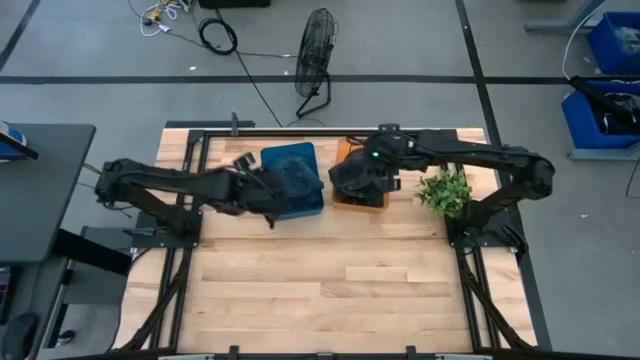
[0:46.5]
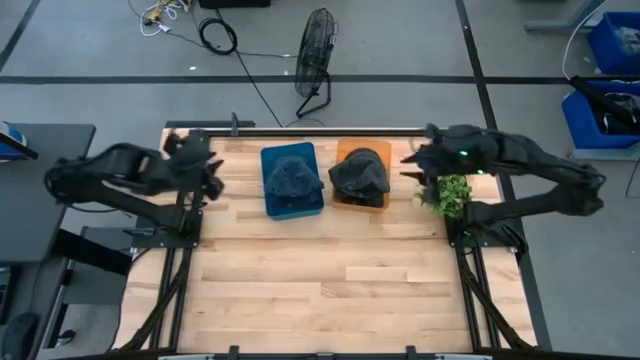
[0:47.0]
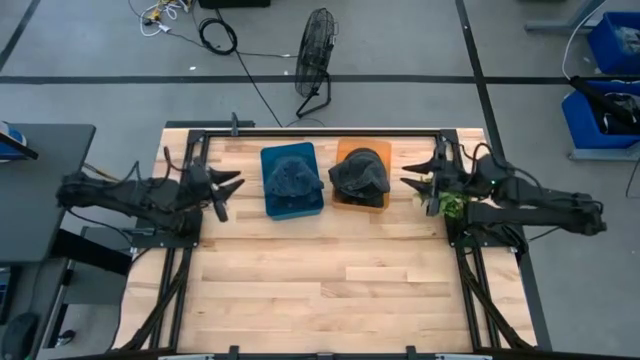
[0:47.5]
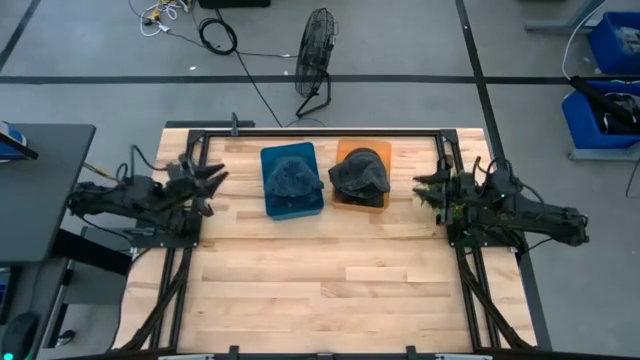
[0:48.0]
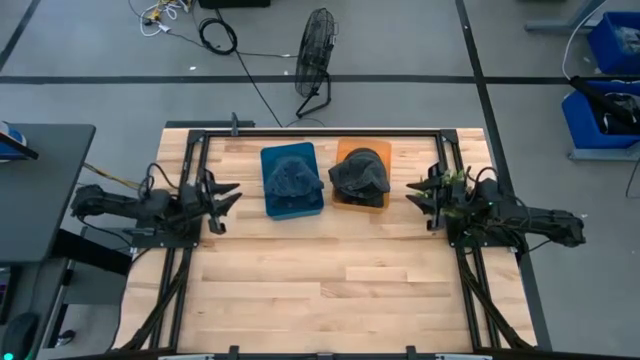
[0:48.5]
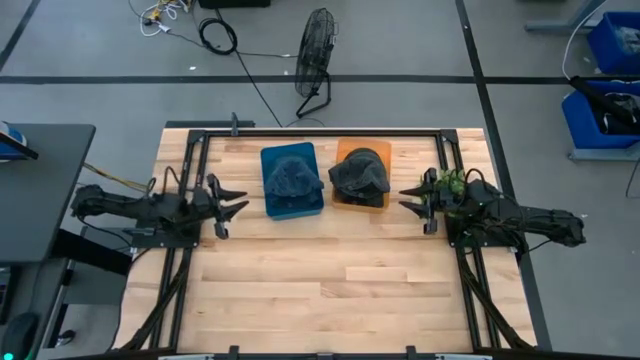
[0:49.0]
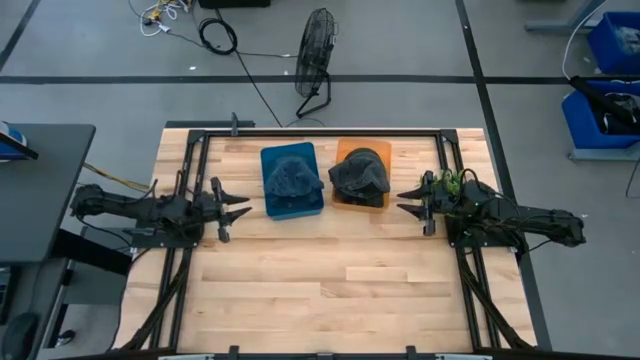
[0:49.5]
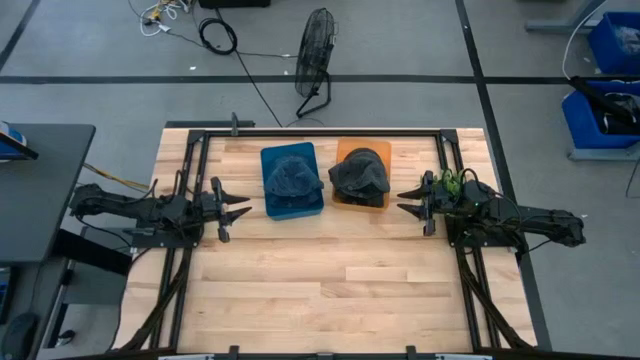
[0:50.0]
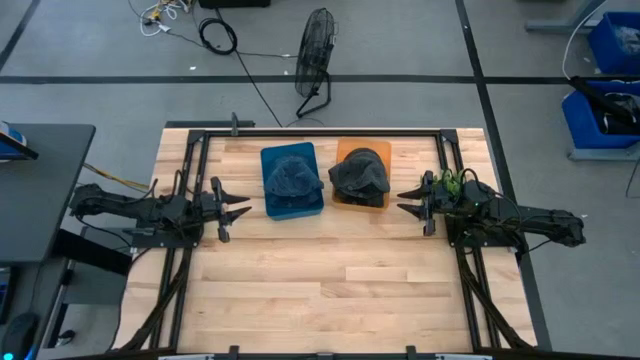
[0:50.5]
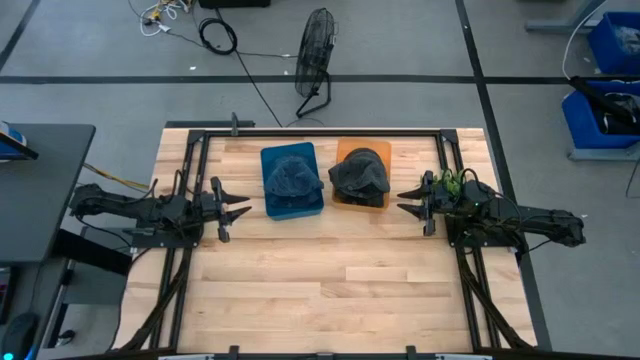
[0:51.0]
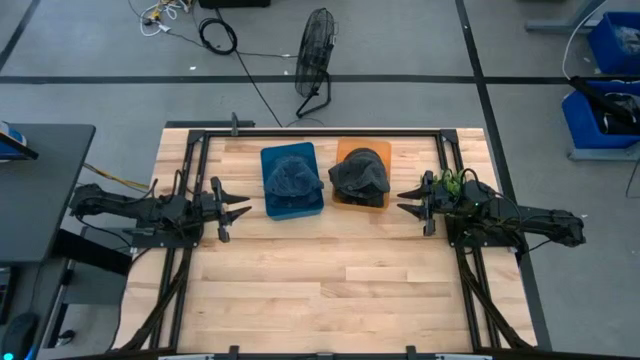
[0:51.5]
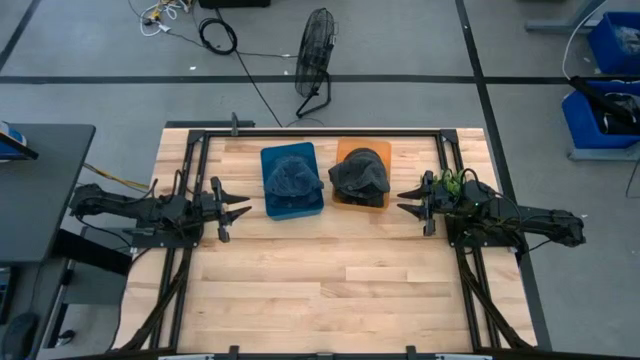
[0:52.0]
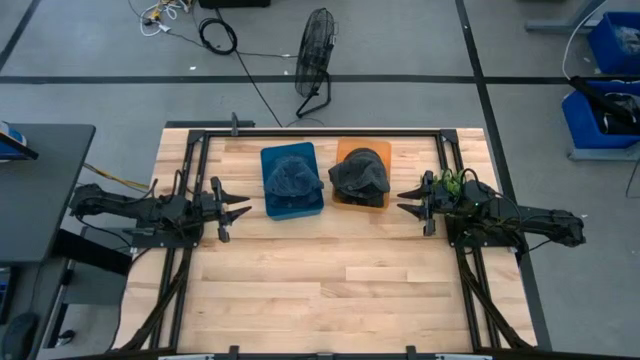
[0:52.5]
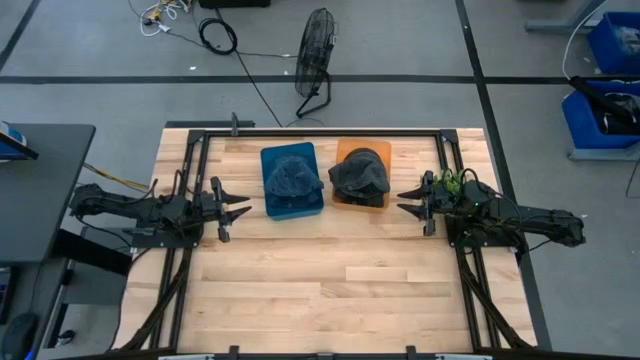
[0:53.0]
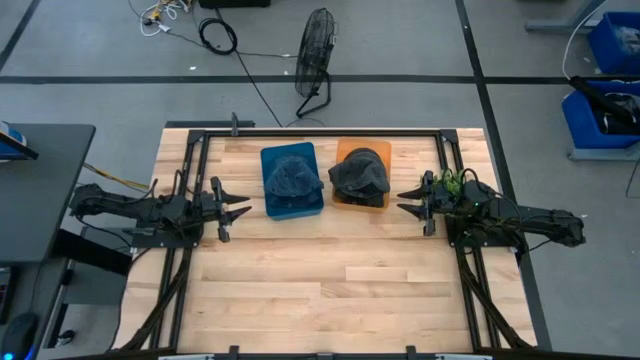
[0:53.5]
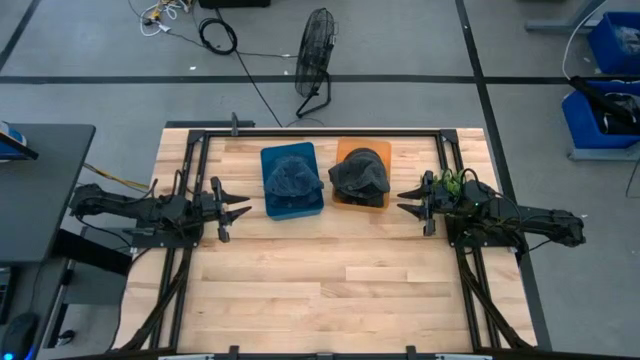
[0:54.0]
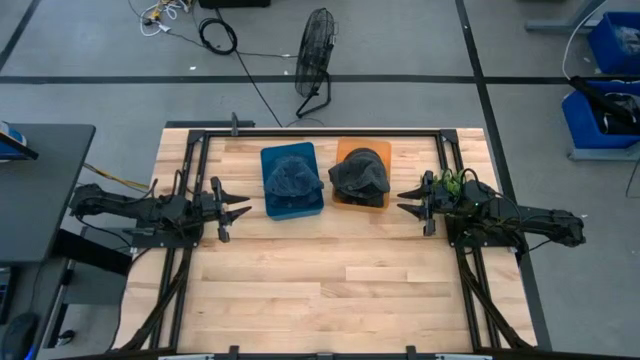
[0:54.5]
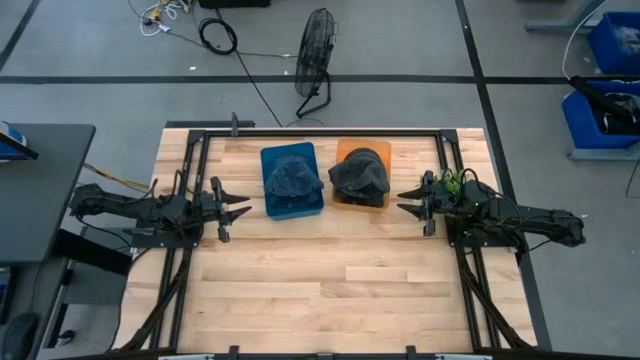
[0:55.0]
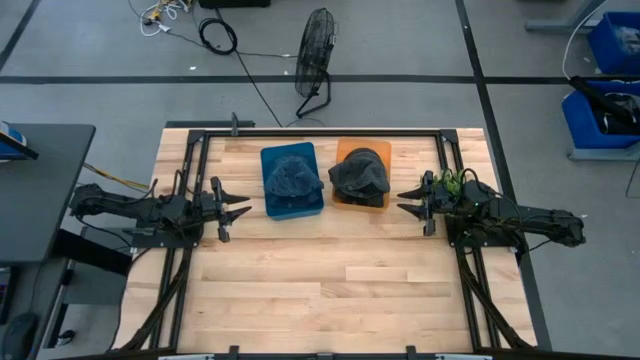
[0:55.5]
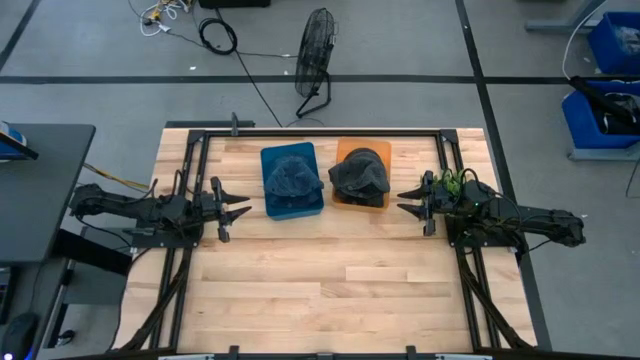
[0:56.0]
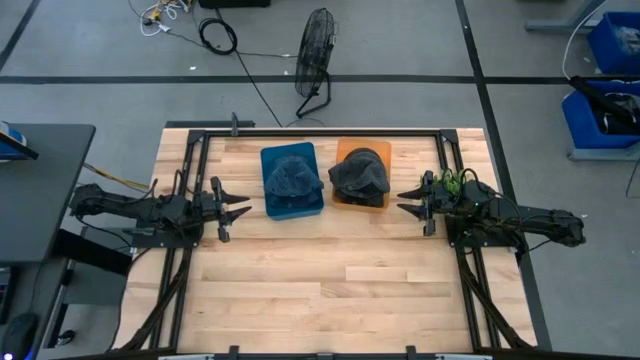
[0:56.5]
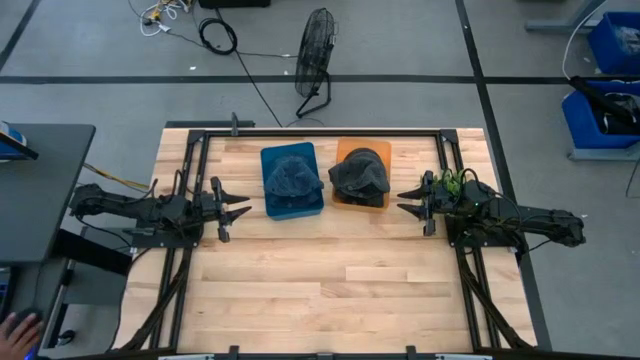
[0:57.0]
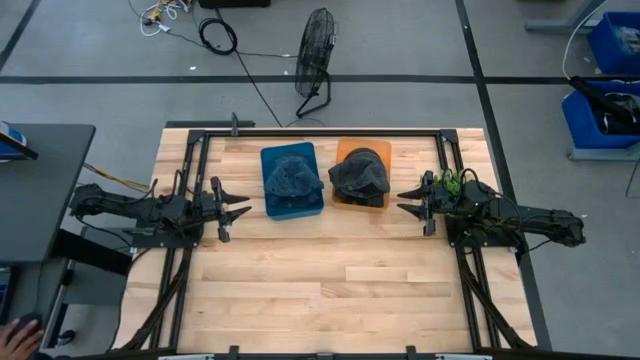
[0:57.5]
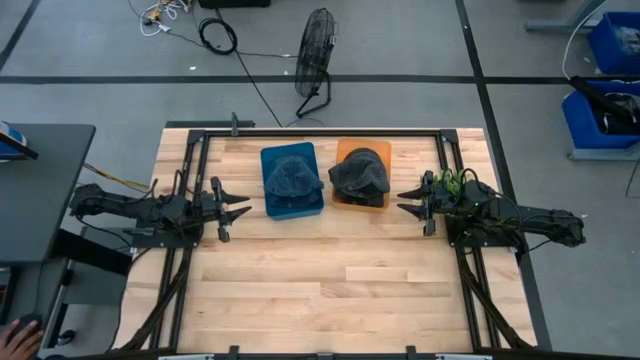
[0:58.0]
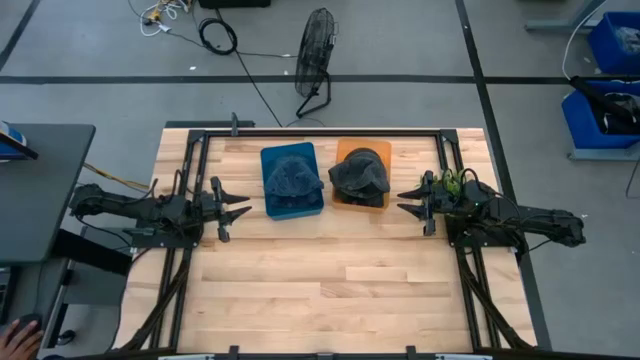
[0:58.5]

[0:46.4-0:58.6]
Task: Pick & Place hat
Return to Home Position

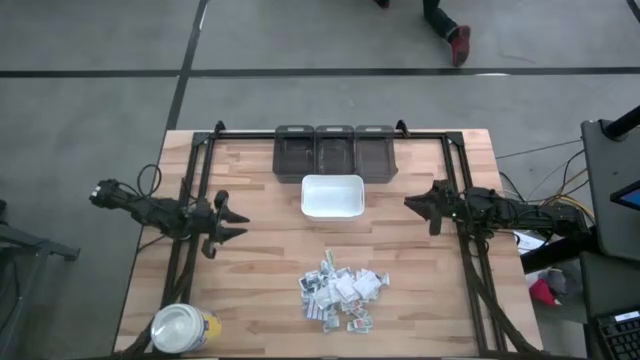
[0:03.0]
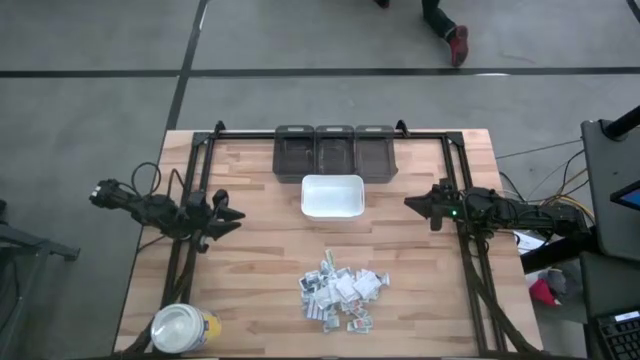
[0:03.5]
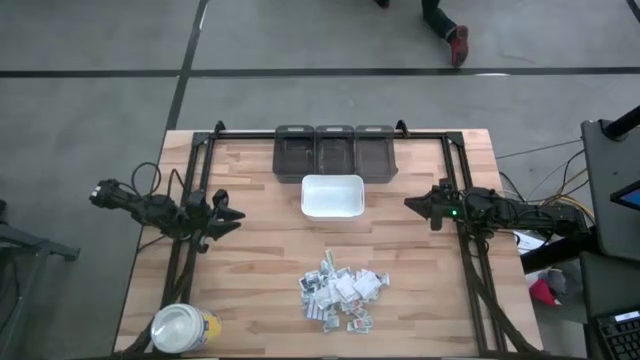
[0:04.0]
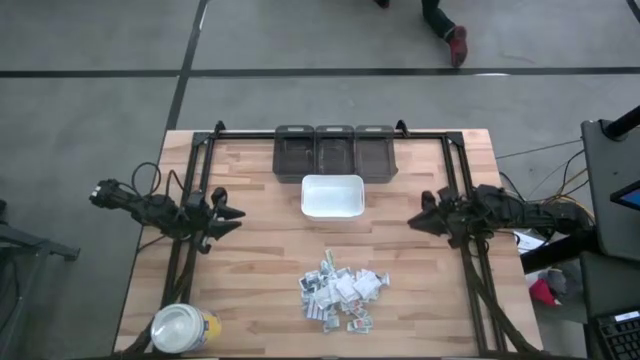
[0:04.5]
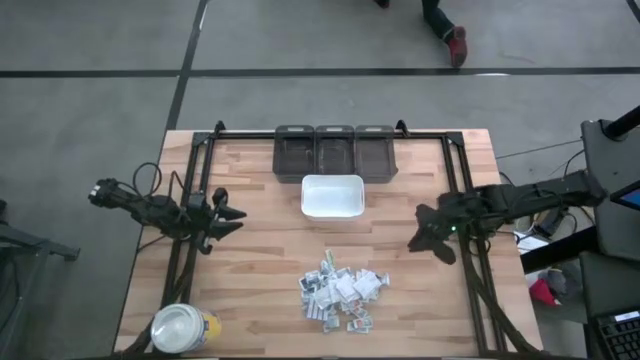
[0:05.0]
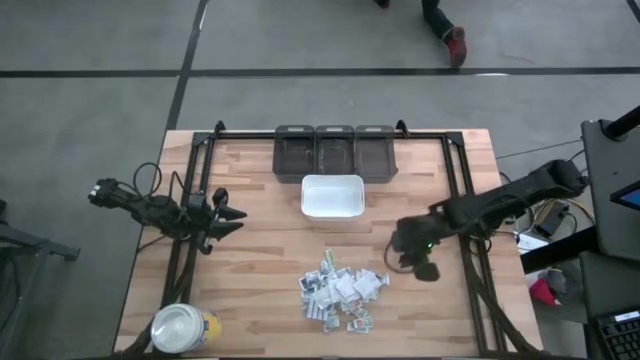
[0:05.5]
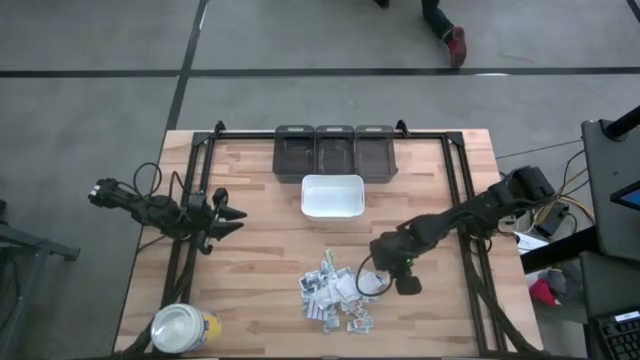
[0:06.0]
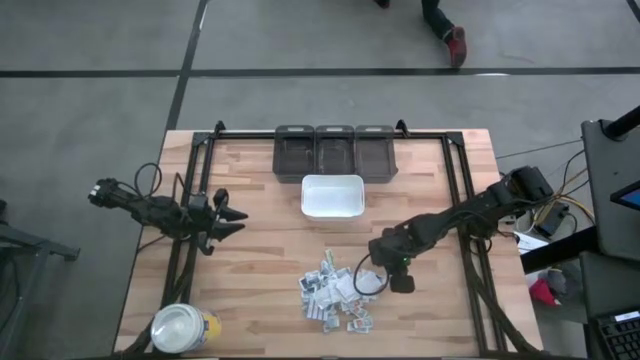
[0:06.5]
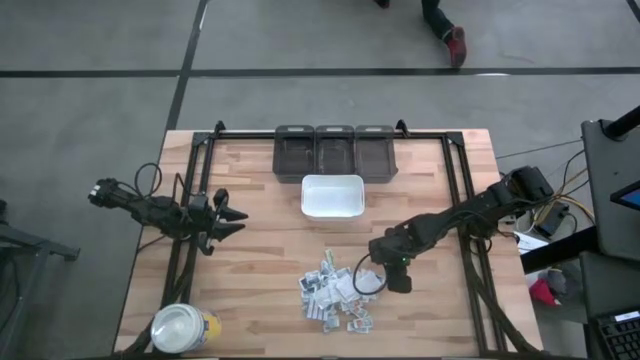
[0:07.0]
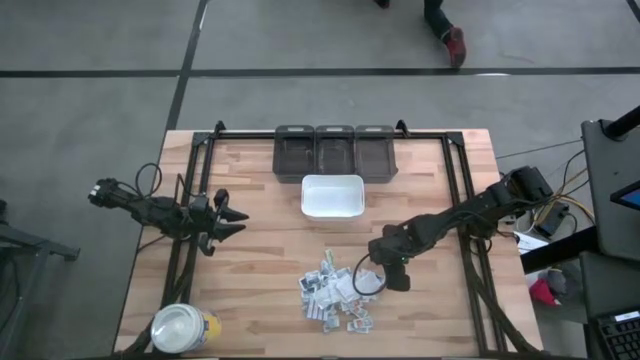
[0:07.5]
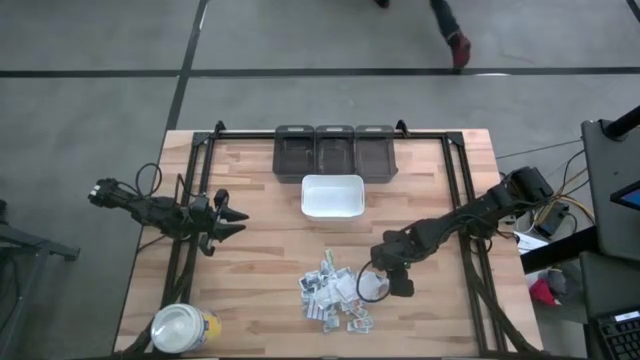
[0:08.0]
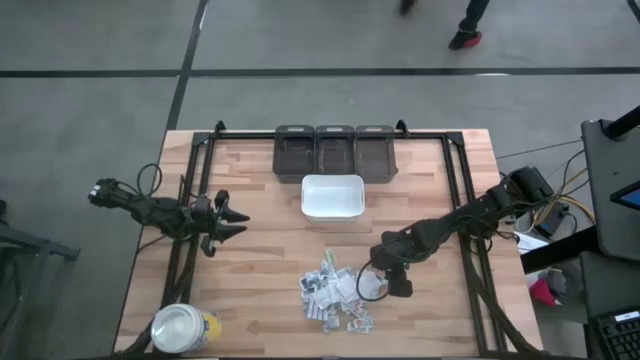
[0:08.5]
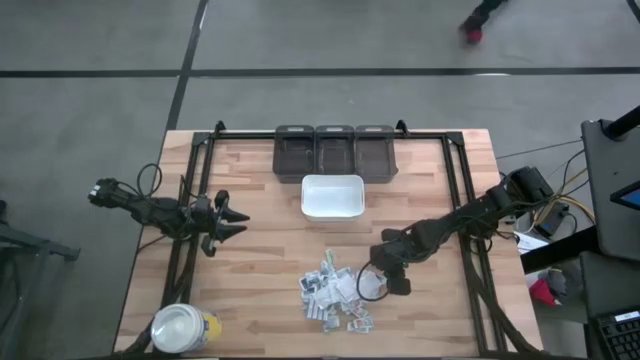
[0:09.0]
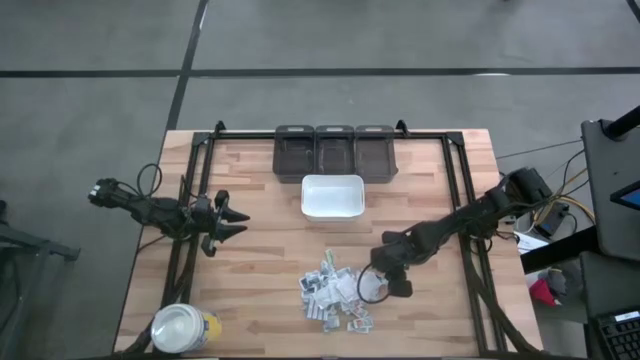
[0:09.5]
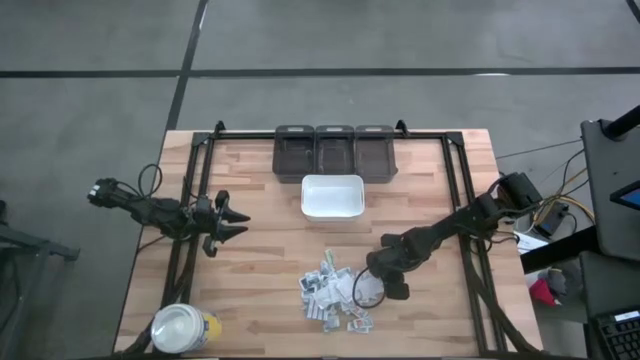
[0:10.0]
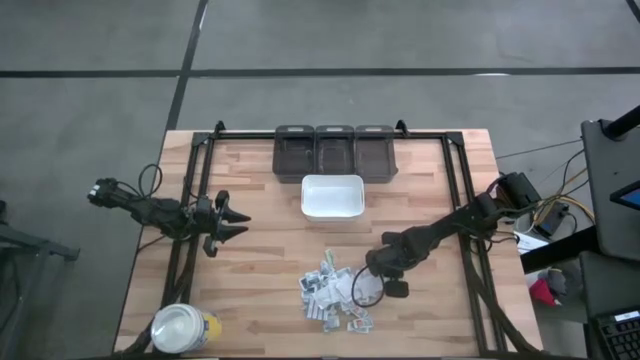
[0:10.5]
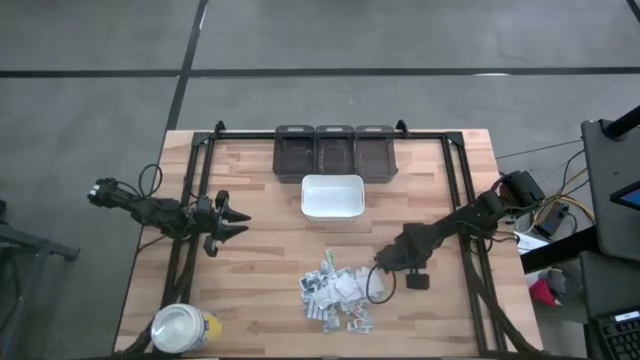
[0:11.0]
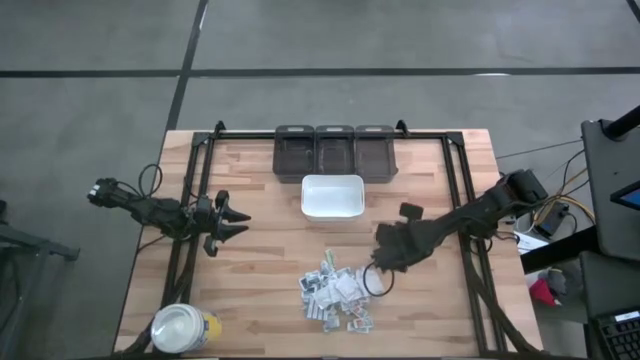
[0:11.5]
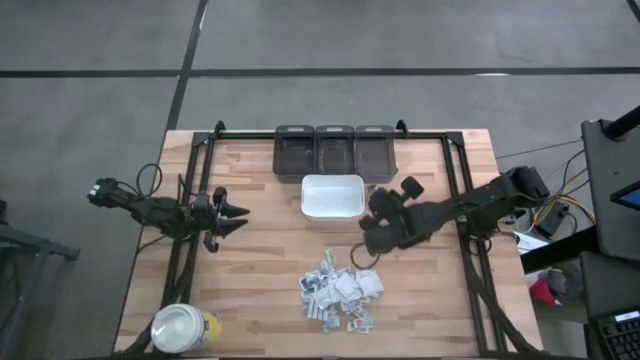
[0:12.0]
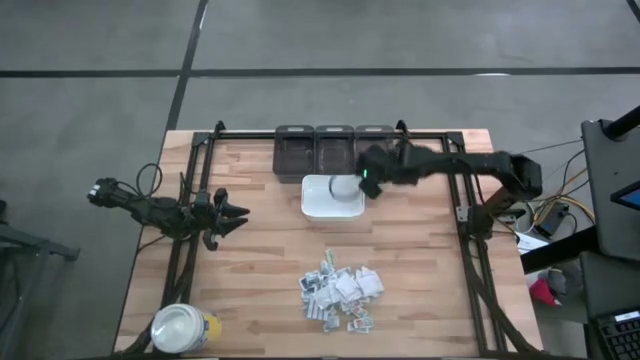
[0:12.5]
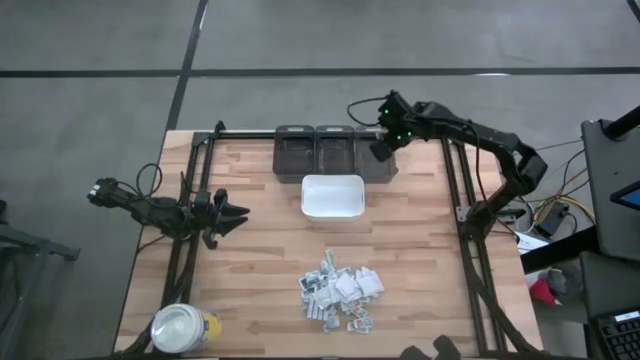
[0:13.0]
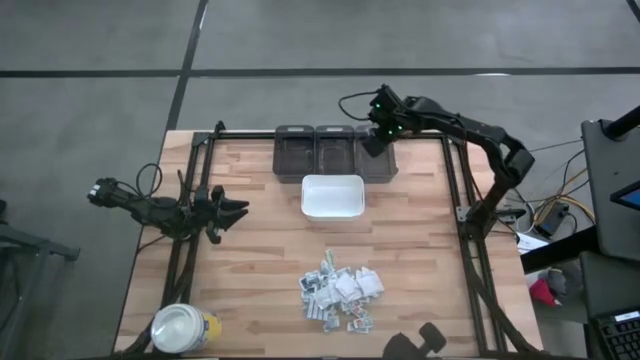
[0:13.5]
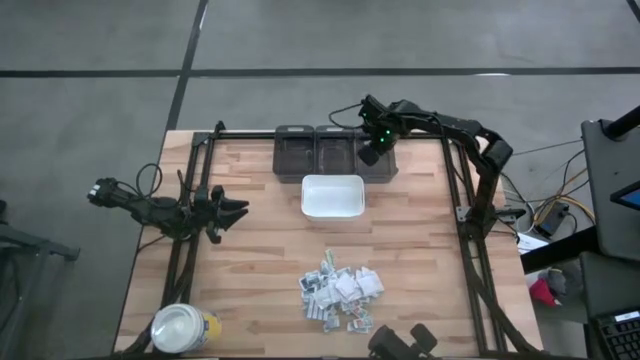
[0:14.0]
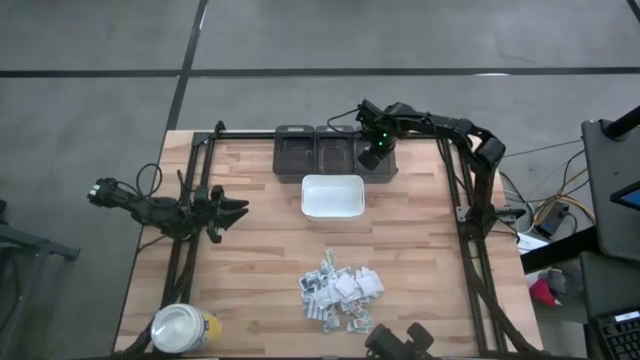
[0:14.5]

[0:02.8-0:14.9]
Task: Pick & Place First Aid Supplies
Put the white alcohol pad into the right black bin
